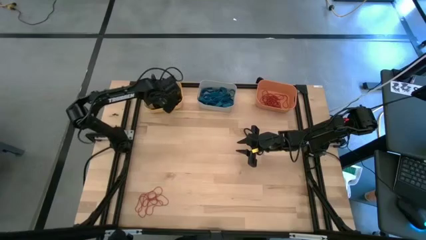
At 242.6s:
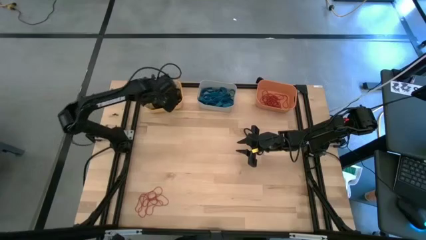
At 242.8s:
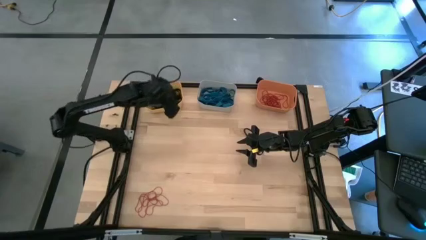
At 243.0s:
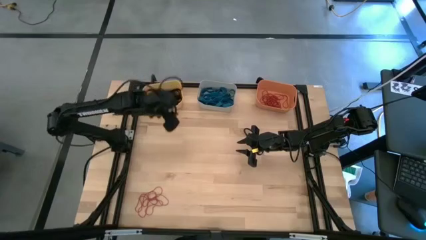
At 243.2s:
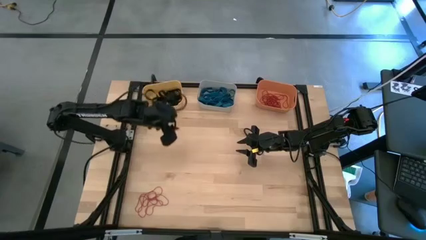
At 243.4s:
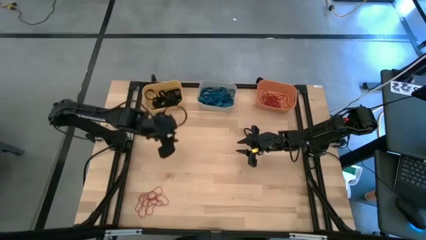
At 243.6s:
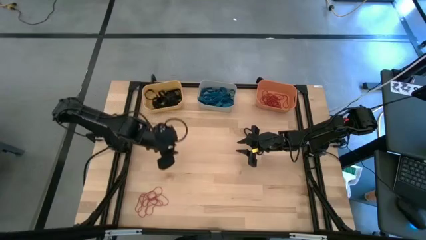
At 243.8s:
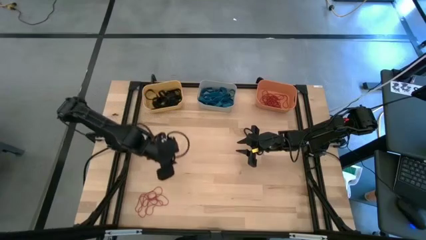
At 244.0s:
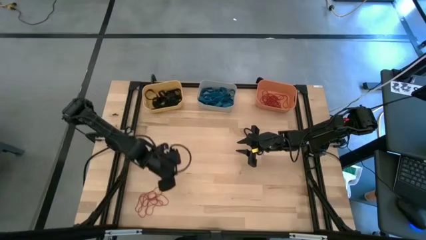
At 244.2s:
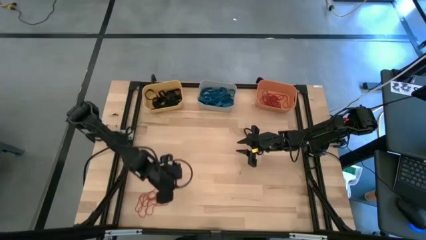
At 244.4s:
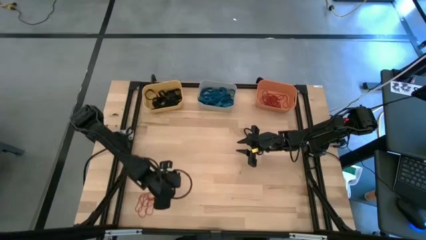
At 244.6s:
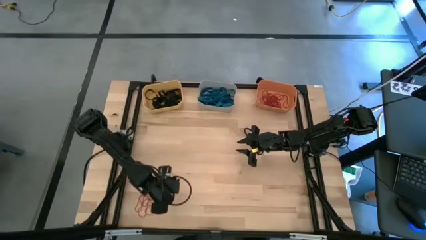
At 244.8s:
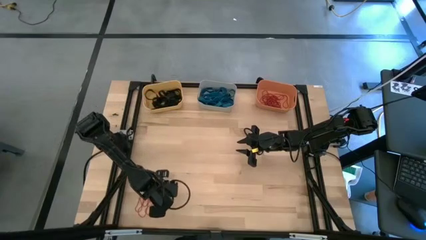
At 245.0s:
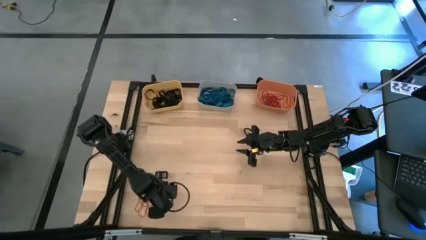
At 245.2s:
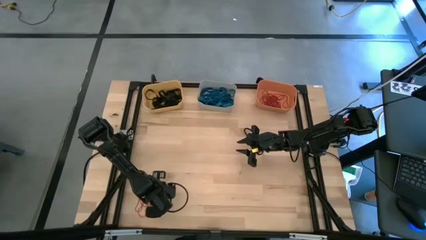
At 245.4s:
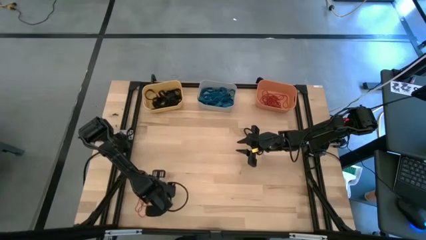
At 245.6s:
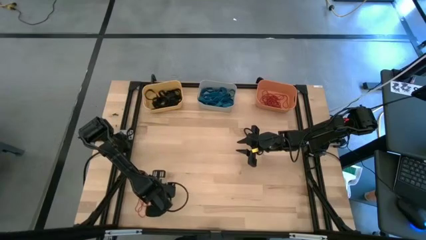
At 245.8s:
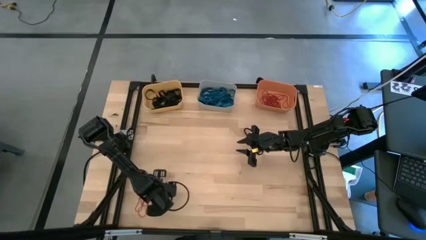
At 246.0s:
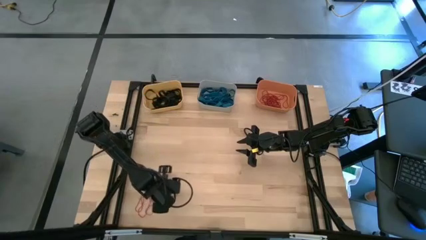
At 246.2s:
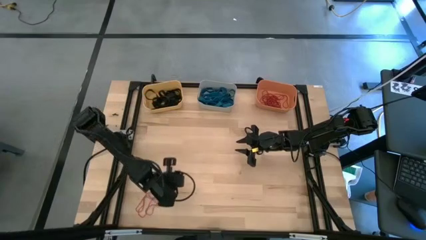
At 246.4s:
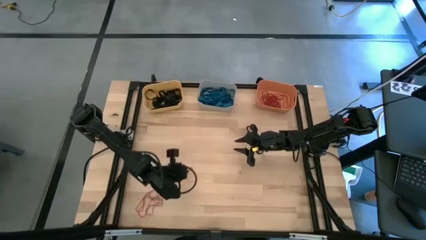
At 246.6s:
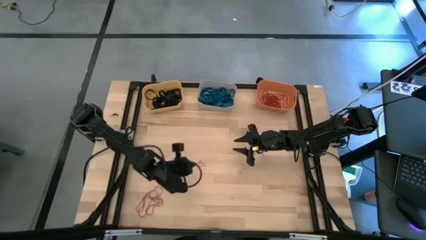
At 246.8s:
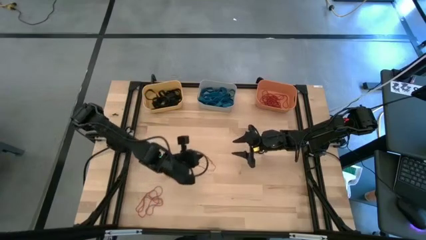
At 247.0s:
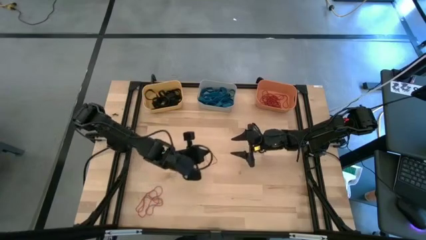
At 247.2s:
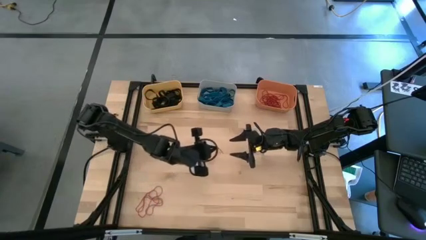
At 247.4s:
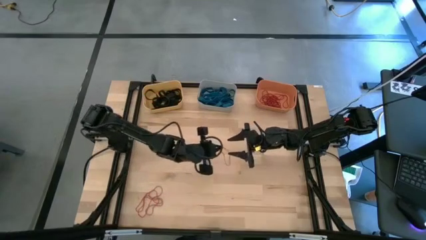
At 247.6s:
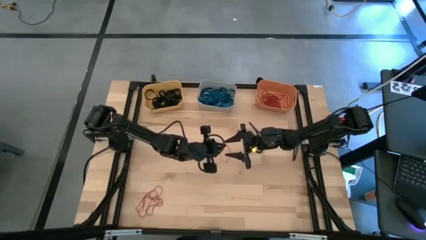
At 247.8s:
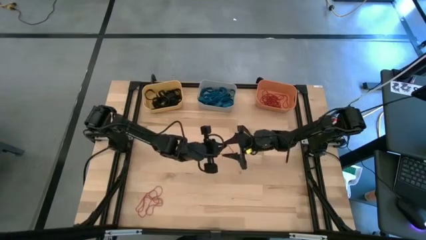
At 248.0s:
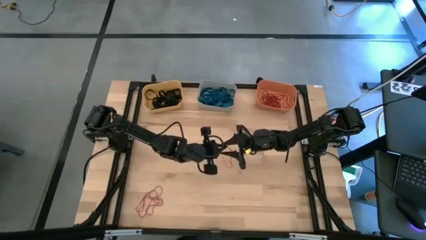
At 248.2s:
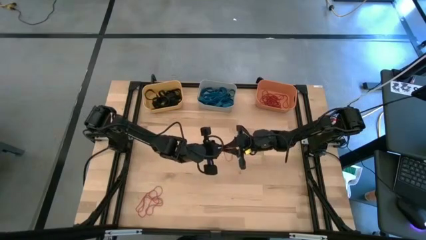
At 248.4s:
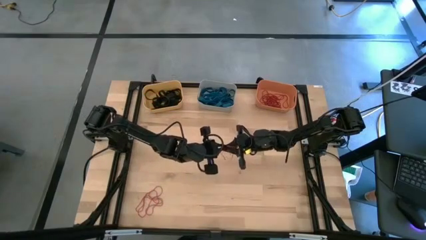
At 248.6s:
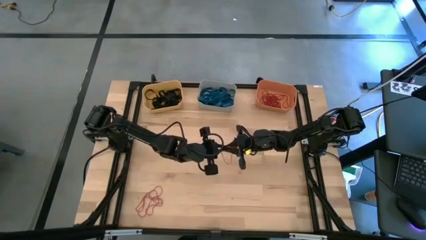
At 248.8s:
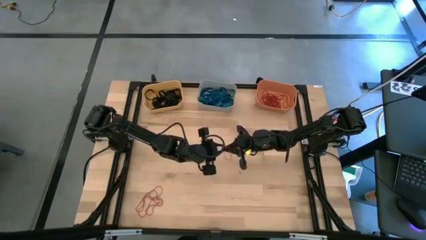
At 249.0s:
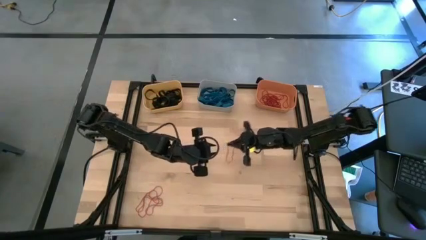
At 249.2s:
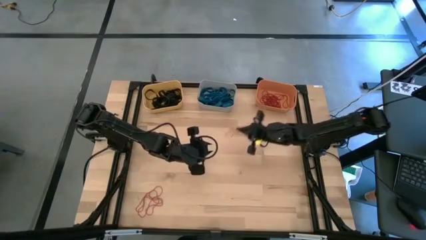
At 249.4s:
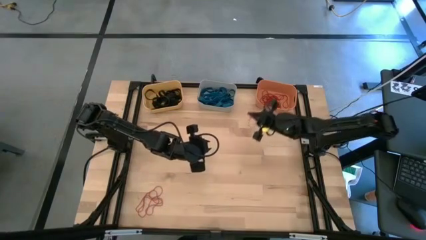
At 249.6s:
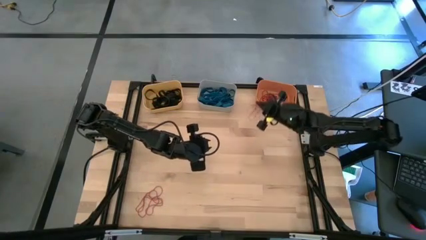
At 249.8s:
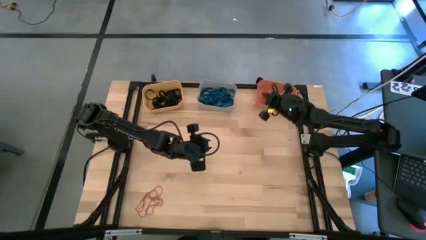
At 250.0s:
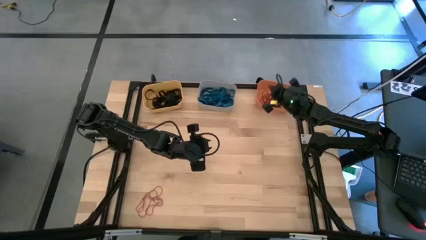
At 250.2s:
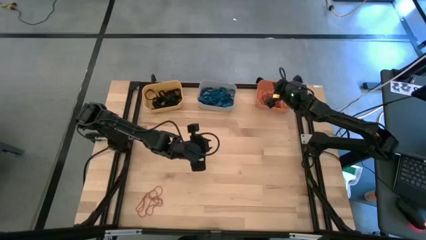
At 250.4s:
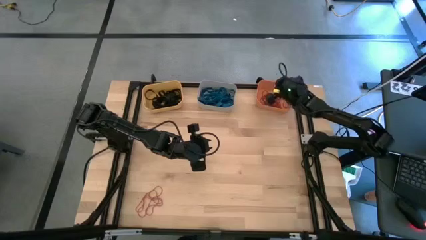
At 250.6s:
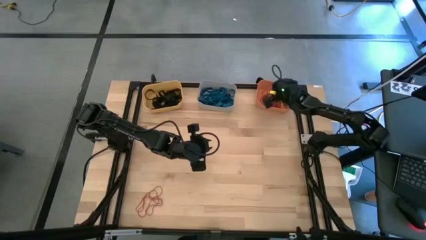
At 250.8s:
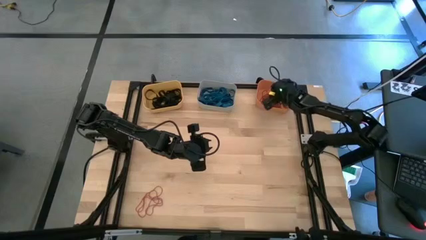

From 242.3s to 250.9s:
Task: Sort rubber bands into baskets
Put the red rubber band into the orange bin

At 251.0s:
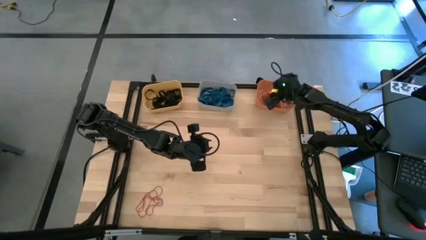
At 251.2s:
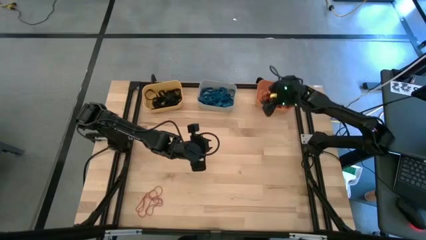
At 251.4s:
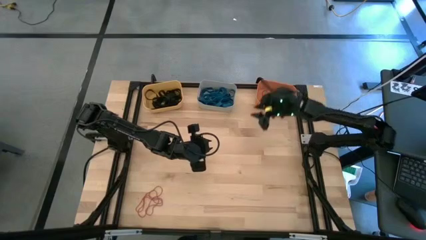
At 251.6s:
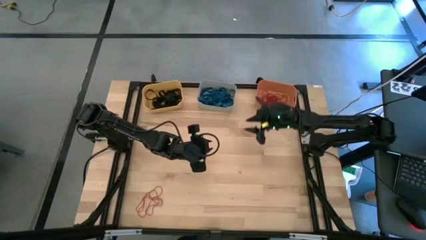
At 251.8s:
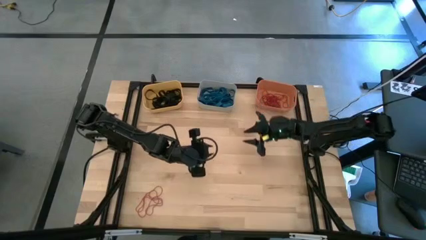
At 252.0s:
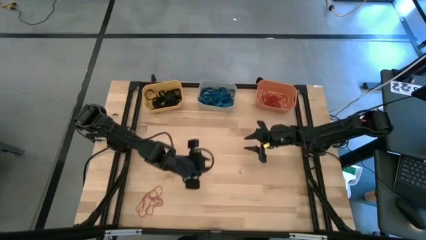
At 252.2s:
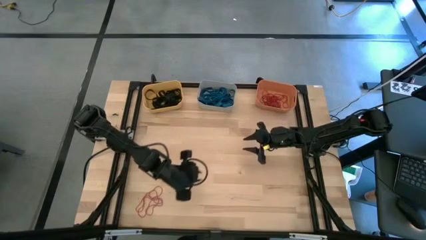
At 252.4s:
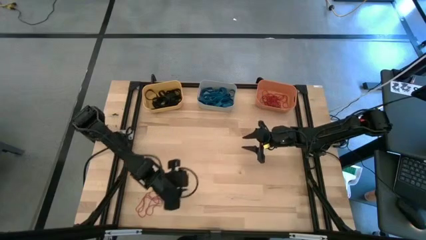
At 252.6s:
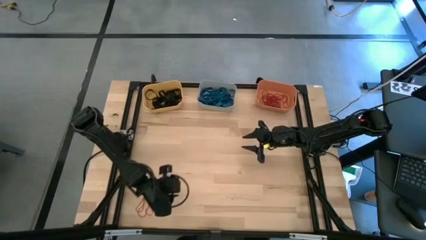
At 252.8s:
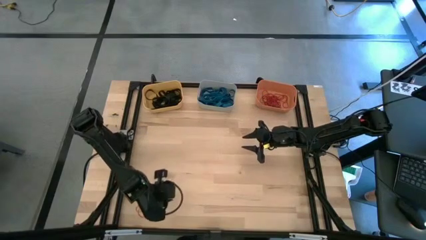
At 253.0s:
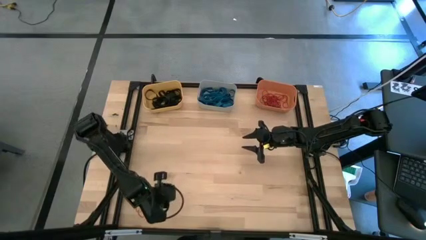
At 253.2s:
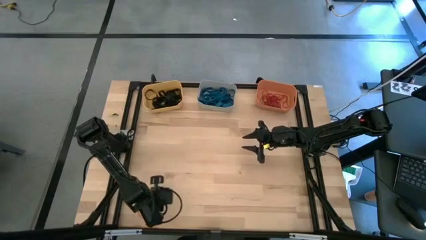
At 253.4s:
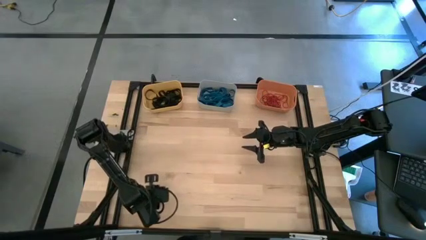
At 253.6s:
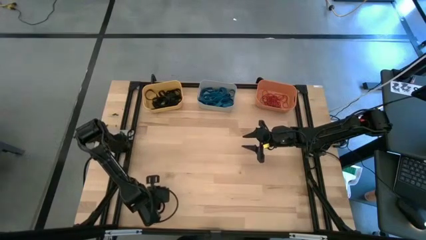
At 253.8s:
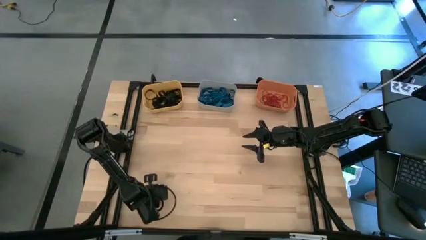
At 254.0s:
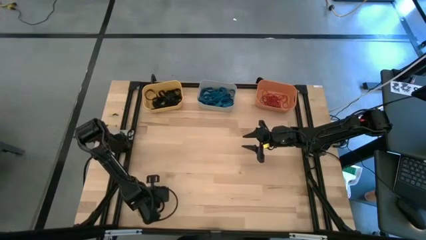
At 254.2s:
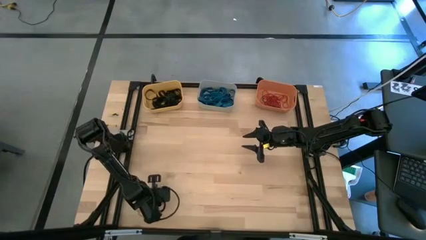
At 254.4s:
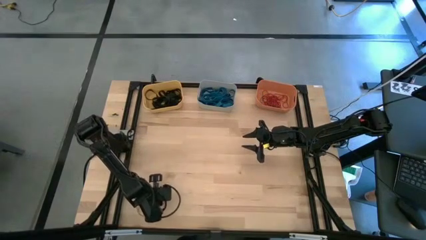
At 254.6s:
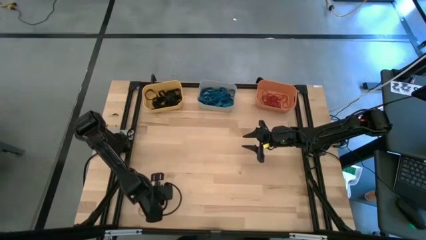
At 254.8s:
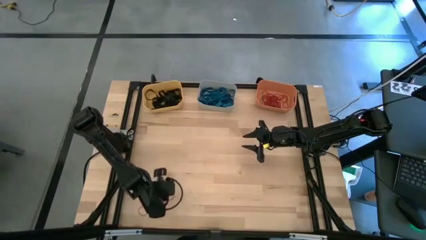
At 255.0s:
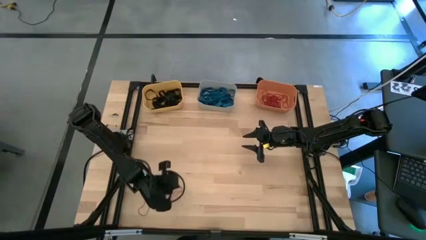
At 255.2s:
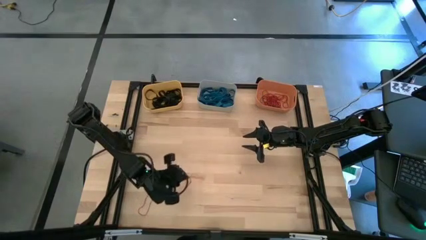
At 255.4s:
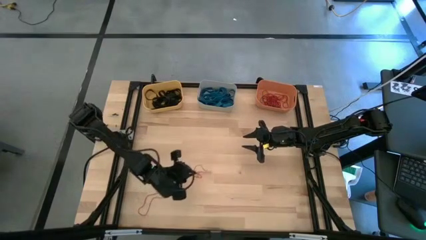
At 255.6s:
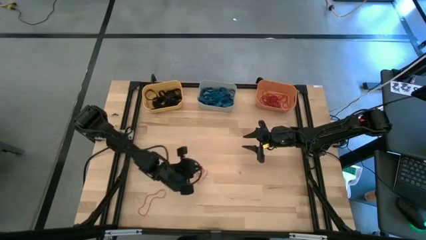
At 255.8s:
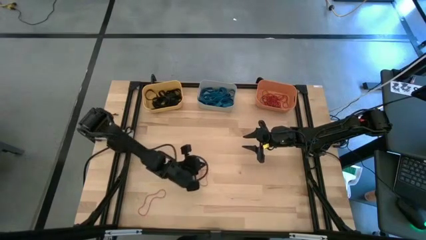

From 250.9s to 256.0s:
Put the red rubber band into the orange bin

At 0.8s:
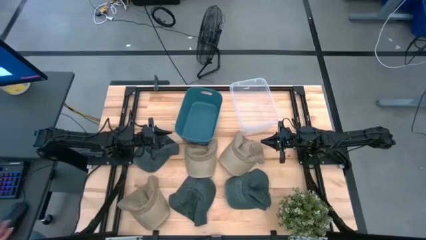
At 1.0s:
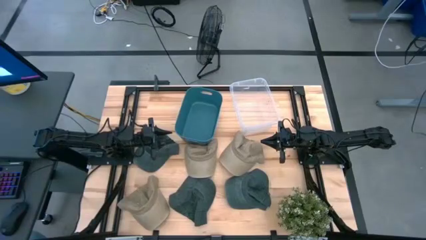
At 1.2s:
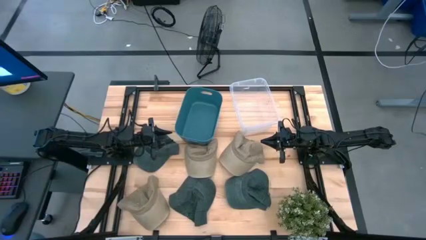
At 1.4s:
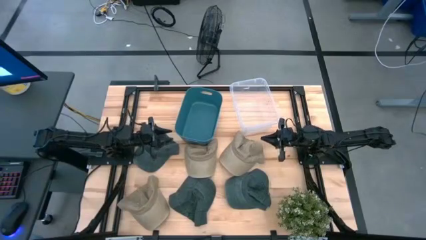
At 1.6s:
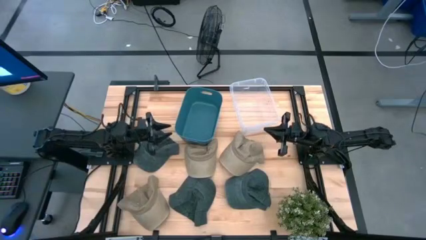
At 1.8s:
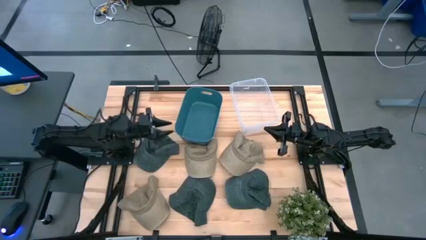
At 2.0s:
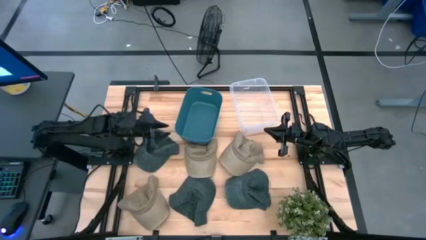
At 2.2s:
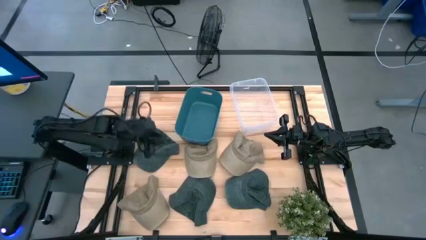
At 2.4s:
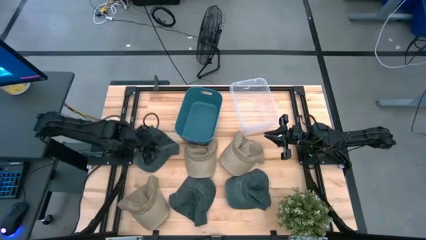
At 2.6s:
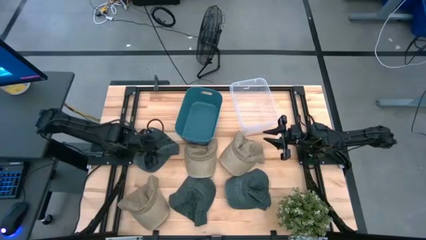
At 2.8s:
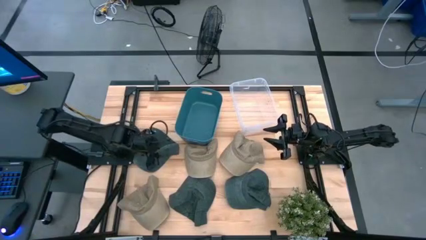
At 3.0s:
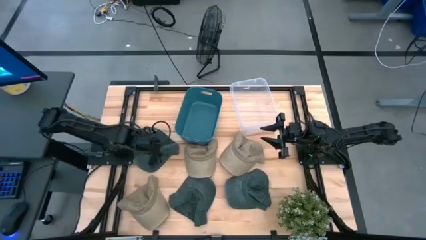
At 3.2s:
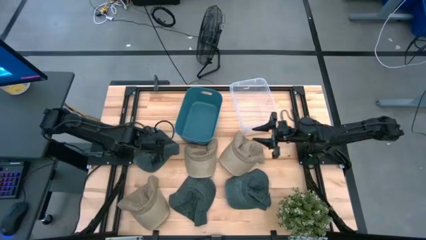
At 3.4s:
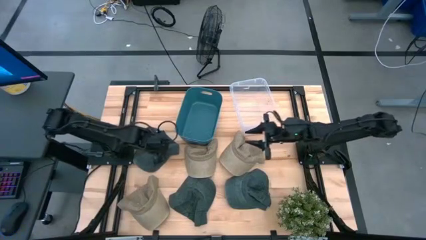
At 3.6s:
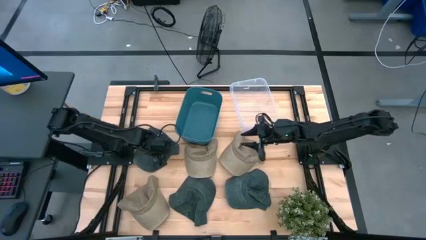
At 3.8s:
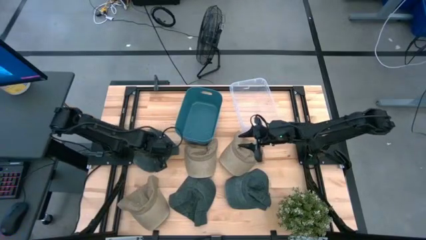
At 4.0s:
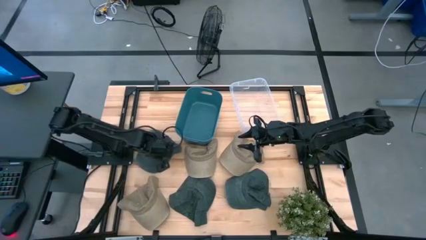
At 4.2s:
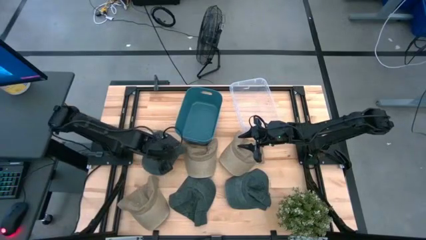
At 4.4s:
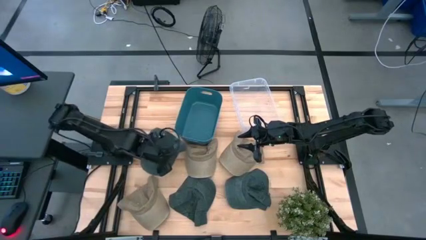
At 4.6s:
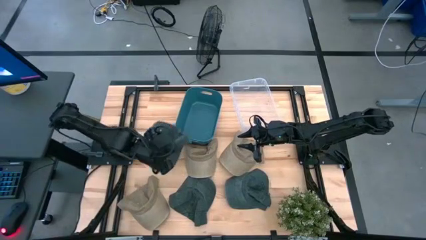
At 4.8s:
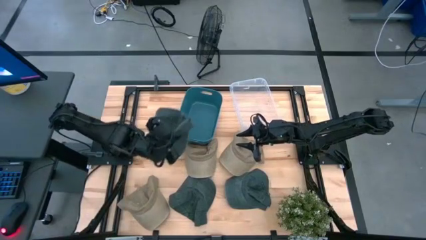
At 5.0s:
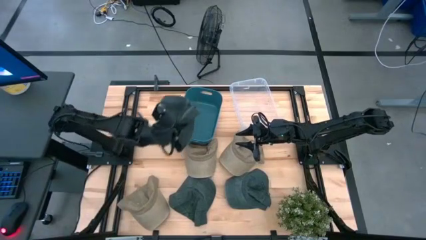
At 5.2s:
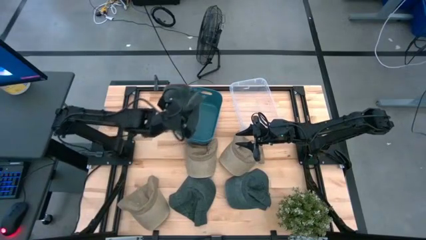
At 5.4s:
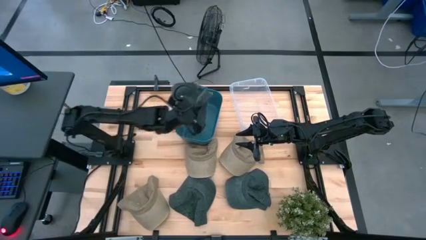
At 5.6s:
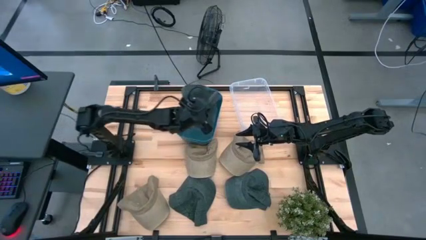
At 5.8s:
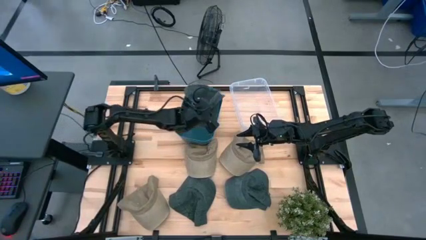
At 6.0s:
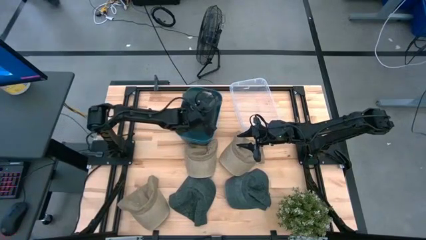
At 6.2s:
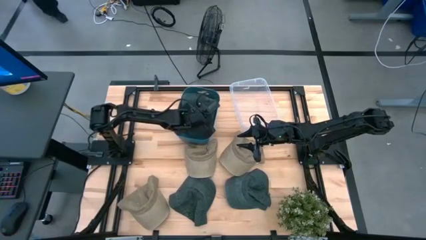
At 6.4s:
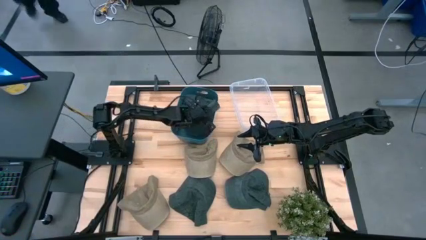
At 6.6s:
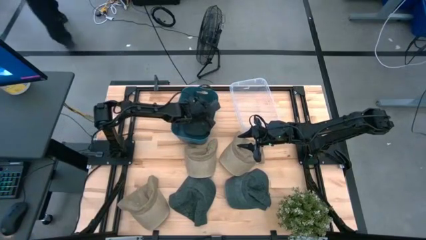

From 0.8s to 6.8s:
Task: Pick & Place hat
Put the left black cap into the blue bin
